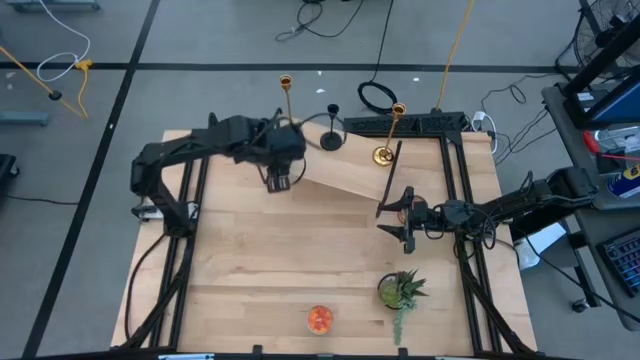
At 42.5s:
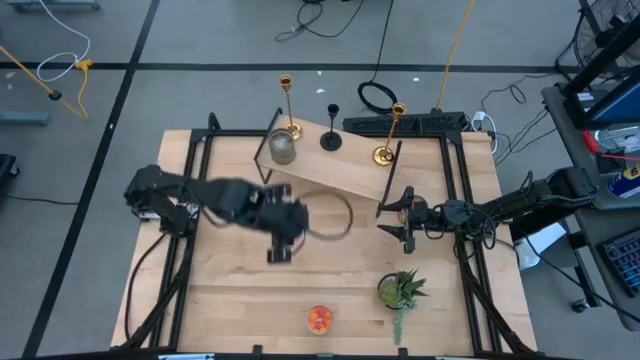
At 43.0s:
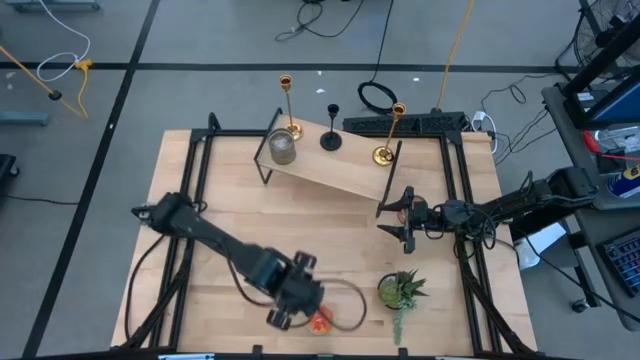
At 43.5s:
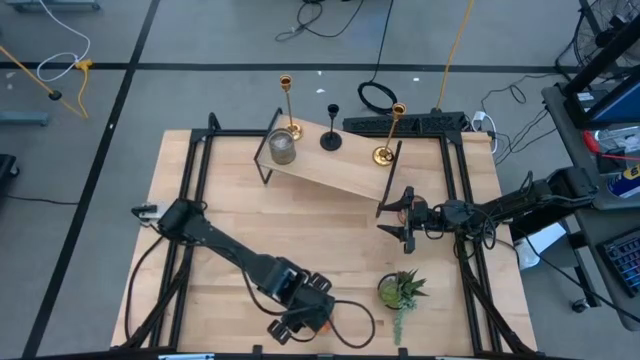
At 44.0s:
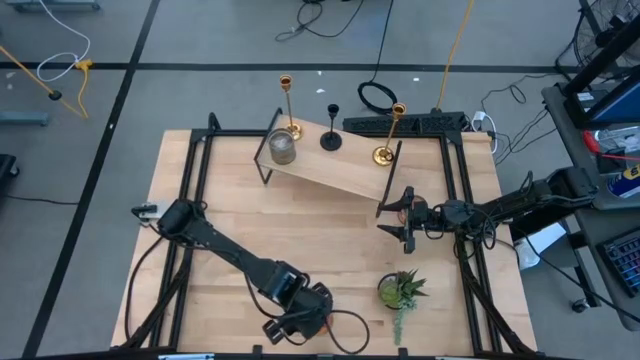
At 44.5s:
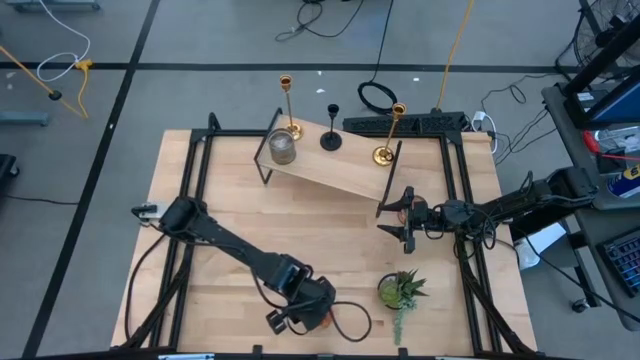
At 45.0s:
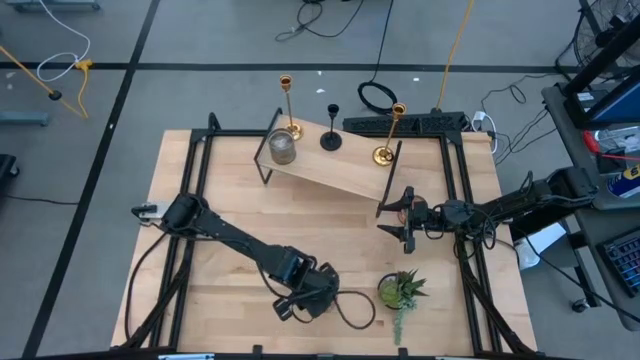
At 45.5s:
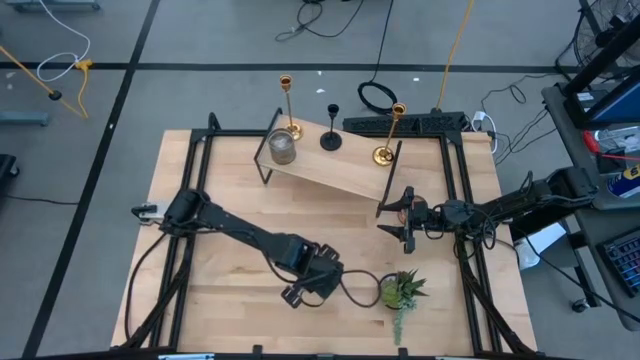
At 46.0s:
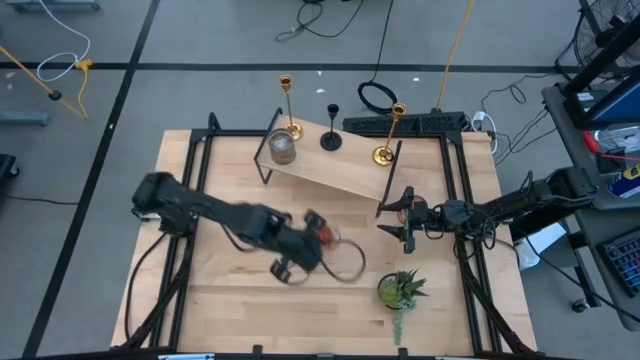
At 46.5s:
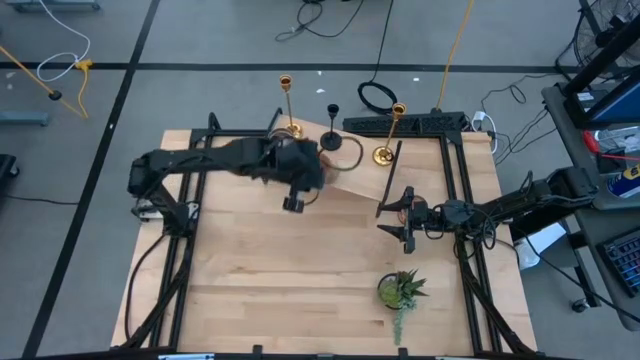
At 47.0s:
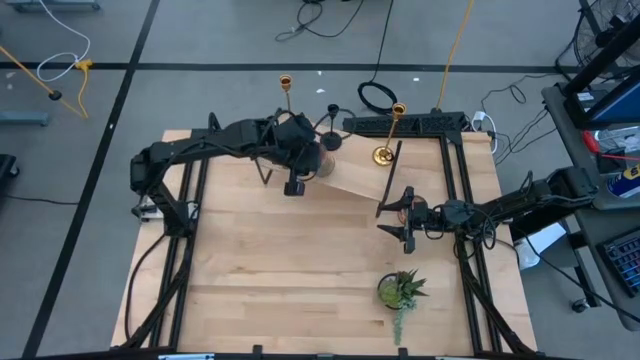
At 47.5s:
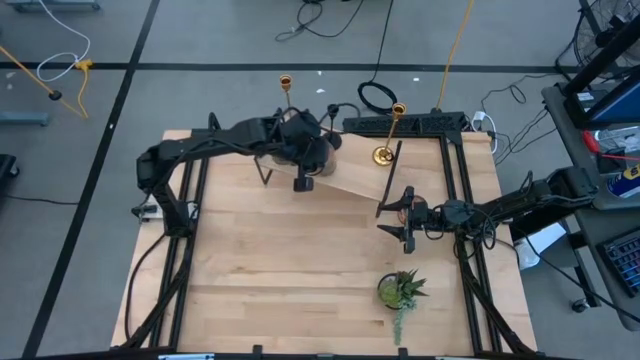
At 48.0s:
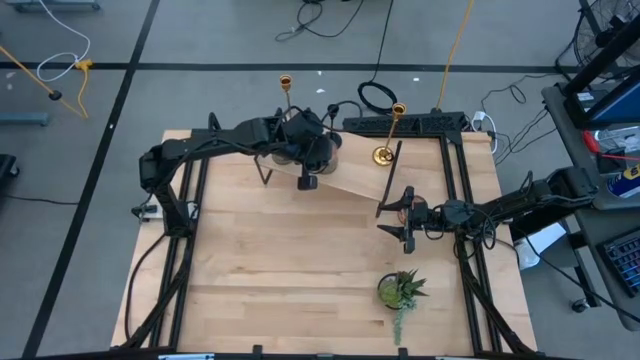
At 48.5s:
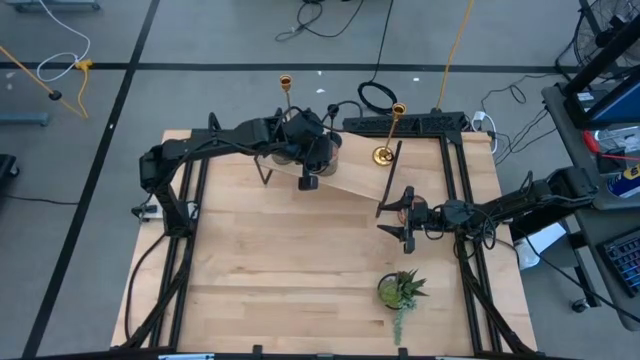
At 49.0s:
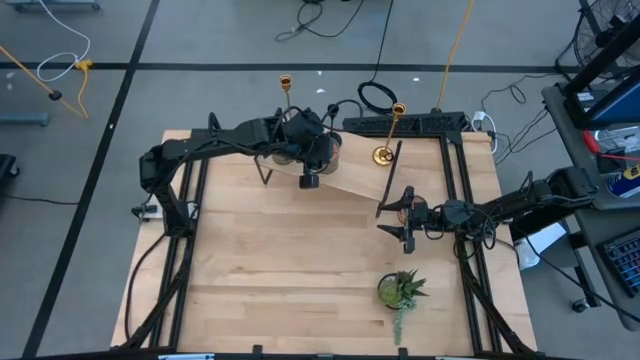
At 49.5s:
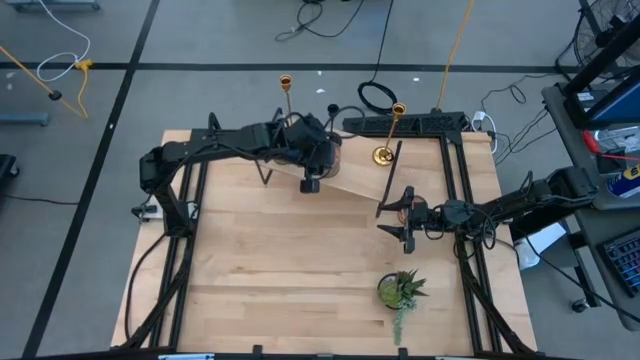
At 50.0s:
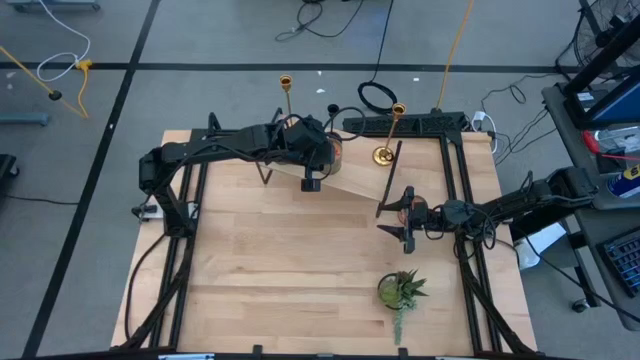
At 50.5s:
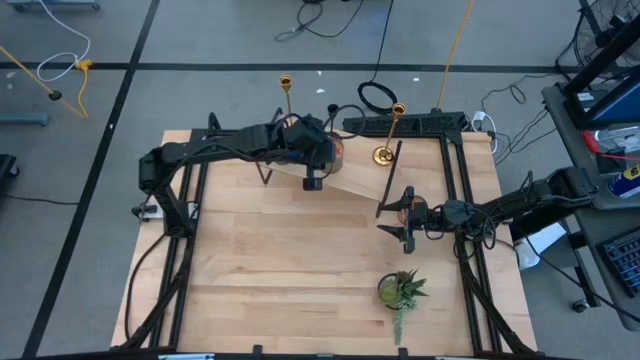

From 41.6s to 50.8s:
Task: Pick & Place candle stick holders
Put the bottom orange scented candle holder on the shelf

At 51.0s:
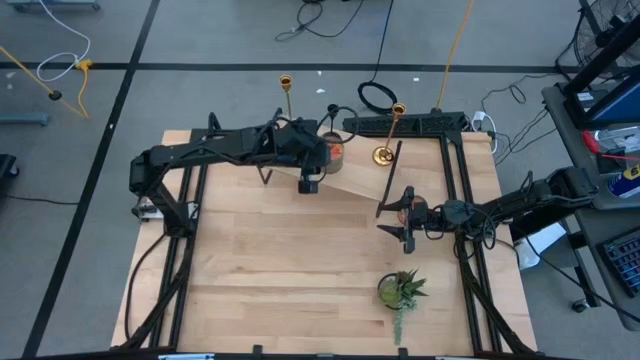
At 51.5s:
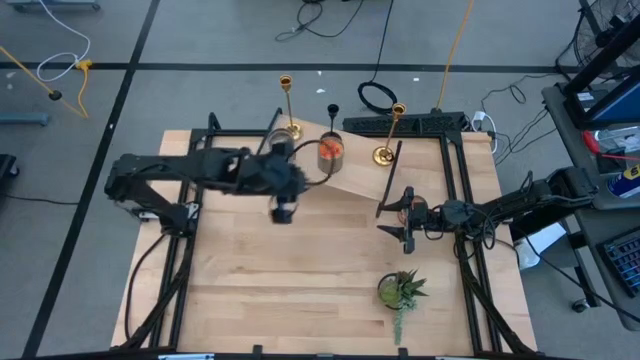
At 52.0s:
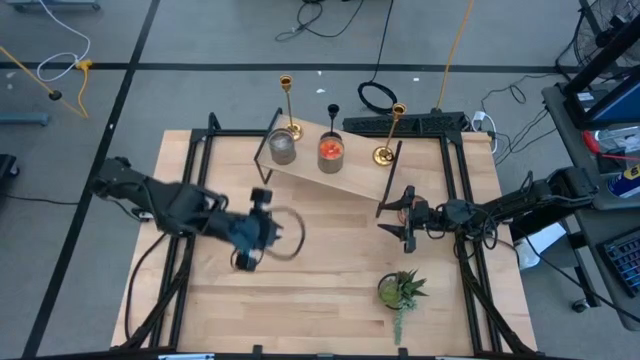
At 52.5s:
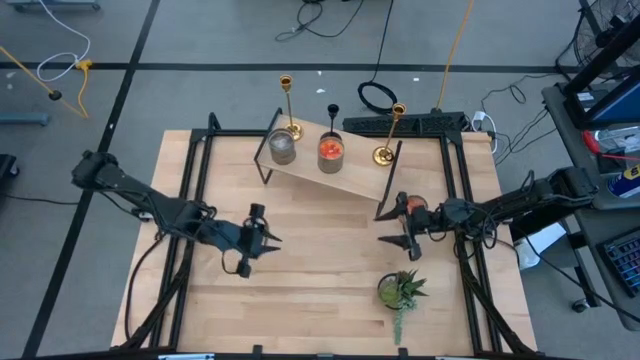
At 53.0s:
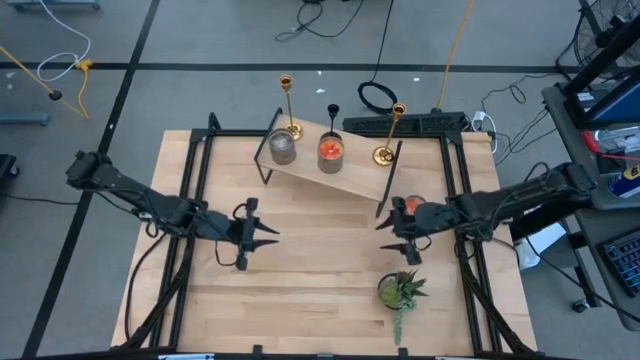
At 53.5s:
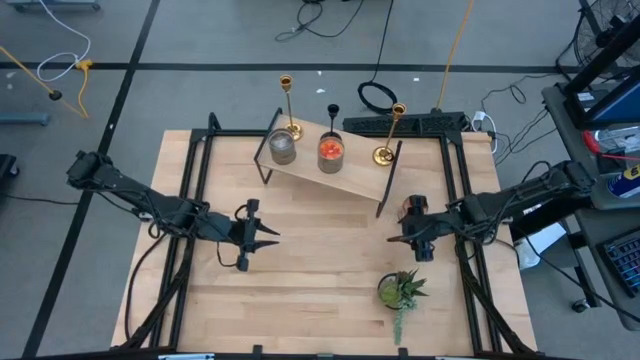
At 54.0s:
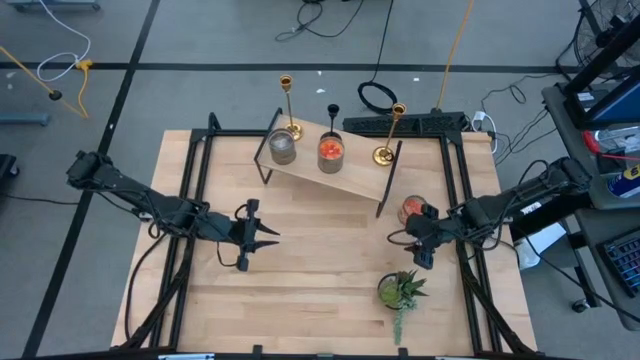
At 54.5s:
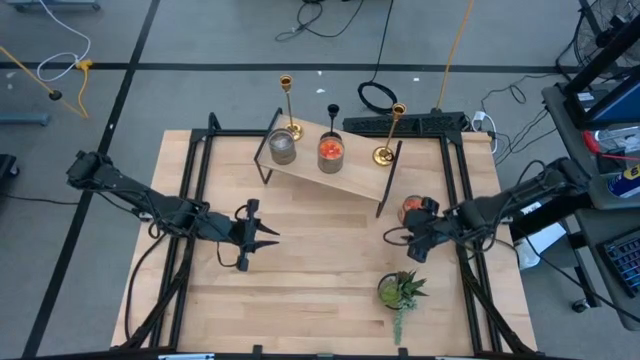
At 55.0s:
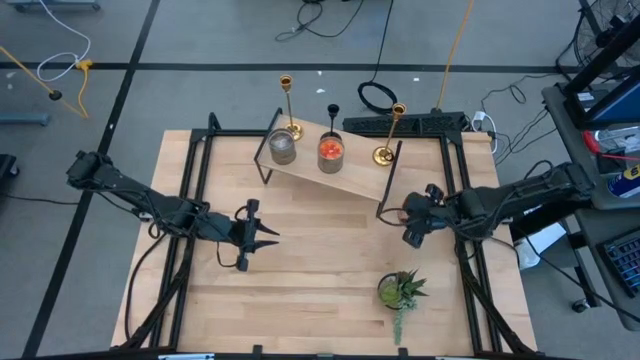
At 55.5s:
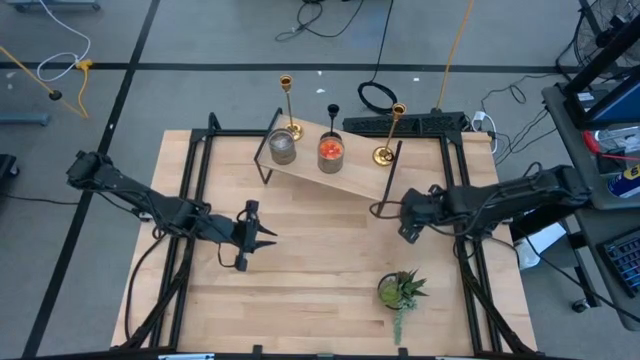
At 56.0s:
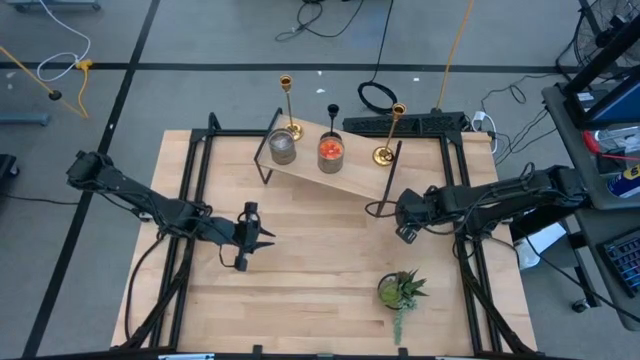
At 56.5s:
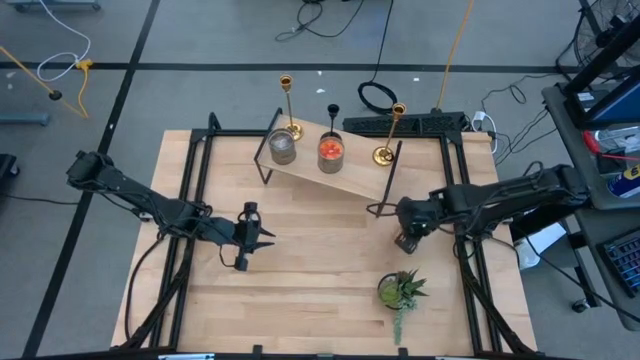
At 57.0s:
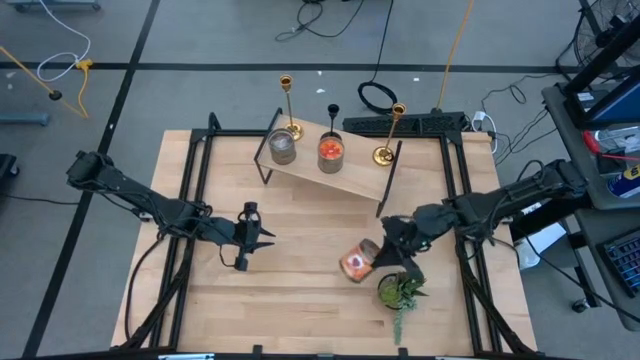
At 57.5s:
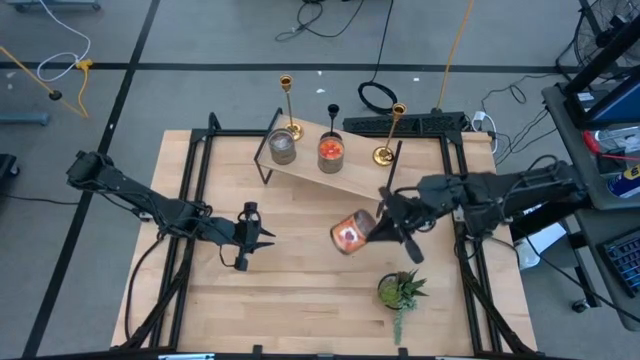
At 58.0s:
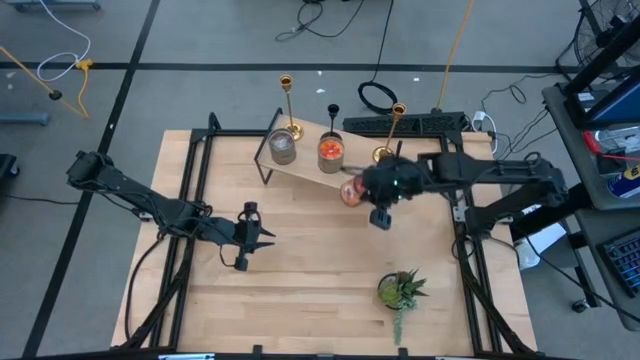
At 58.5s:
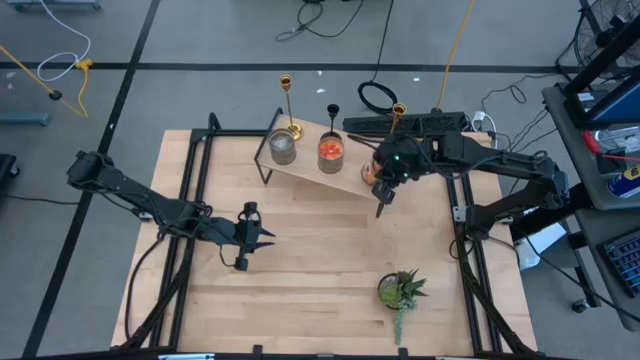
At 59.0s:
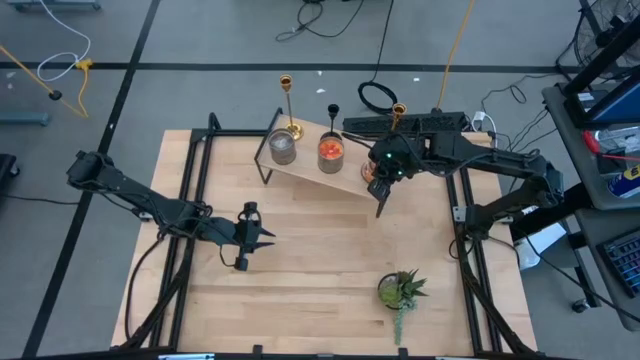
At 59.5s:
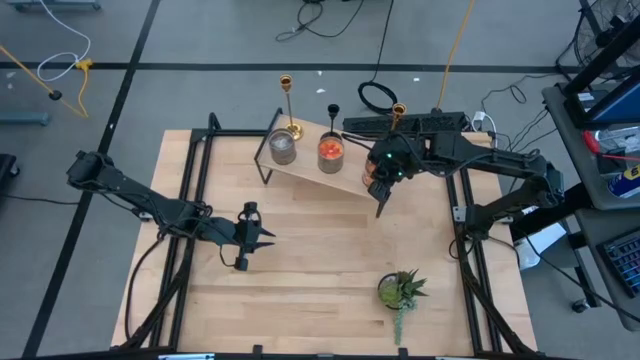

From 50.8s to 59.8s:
Put the orange scented candle holder on the shelf align with the other orange scented candle

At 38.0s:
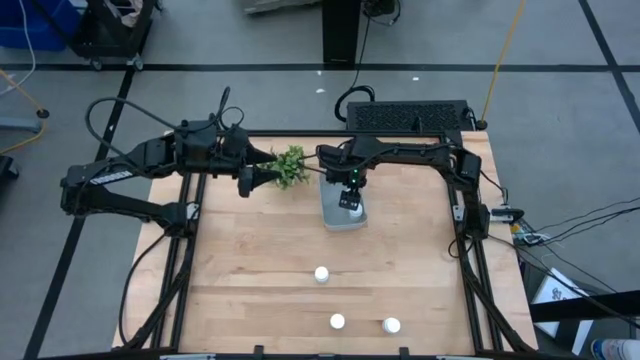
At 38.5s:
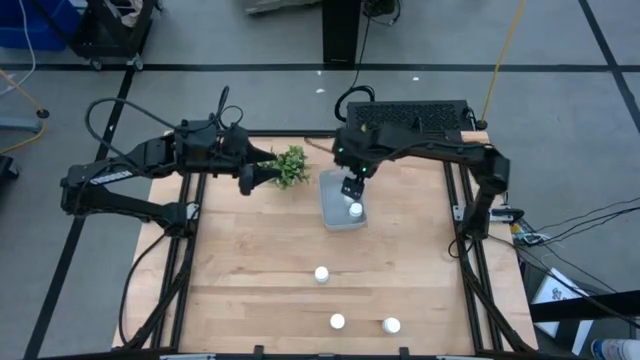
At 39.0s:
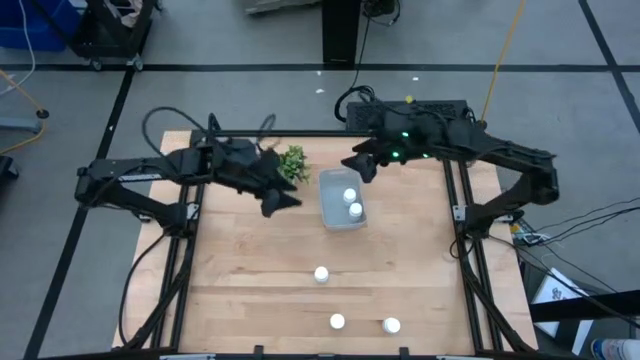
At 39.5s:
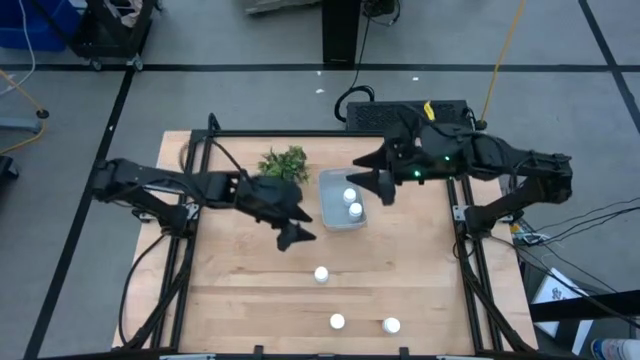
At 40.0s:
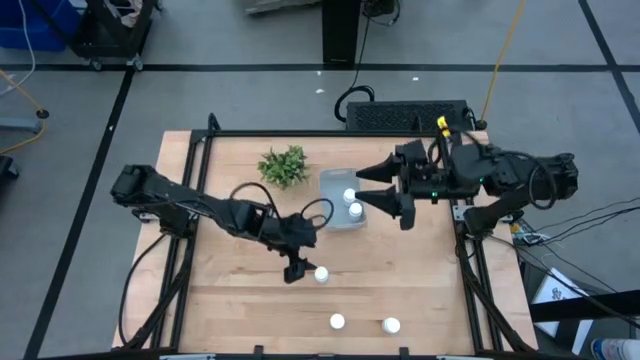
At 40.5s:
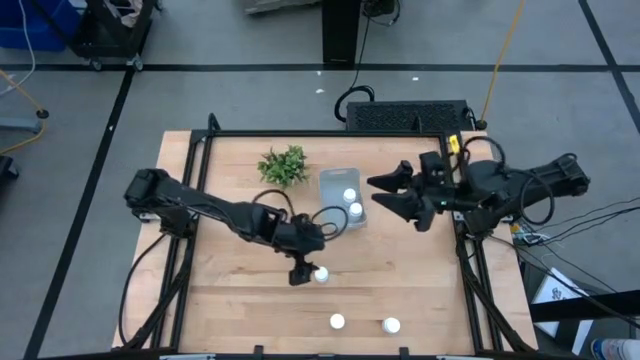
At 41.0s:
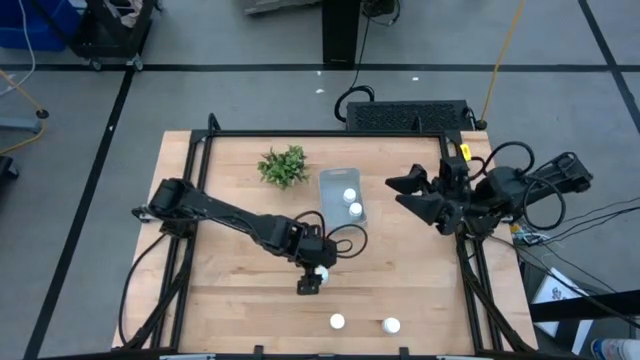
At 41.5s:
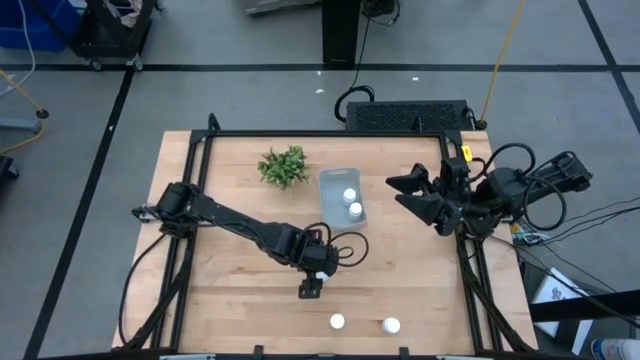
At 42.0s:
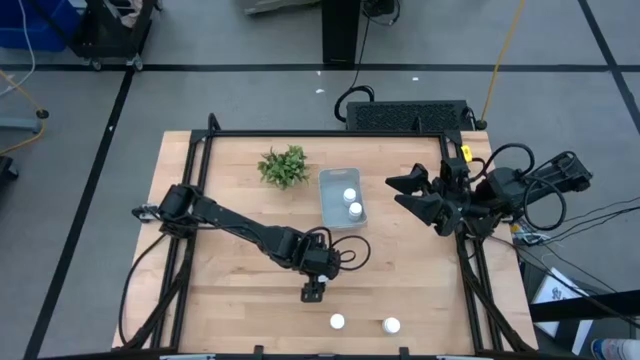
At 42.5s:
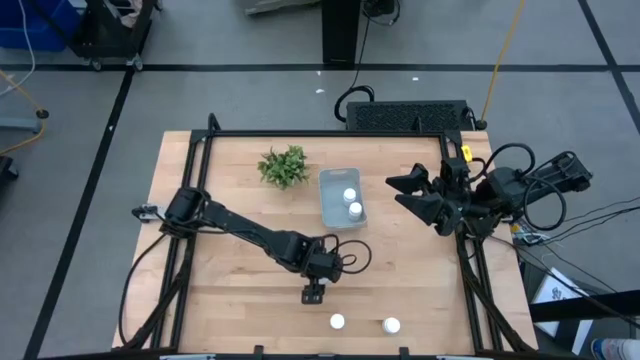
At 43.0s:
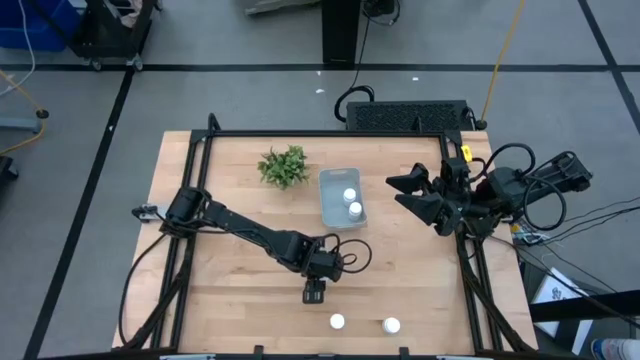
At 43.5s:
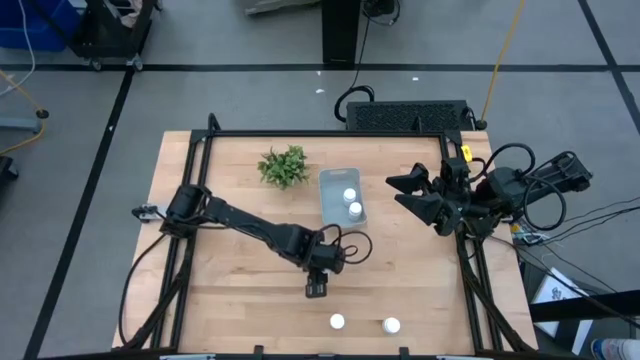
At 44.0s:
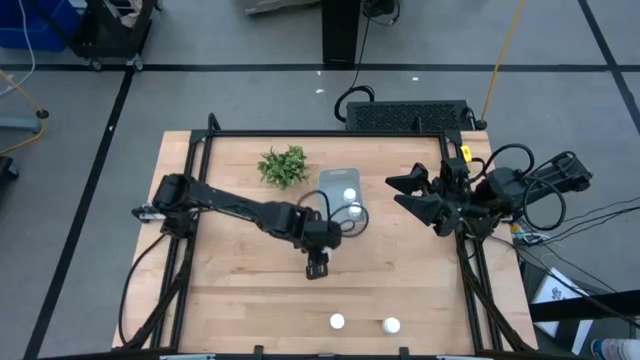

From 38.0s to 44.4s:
Task: Pick and place pill bottles into a basket
Put the white pill bottle into the gray bin
